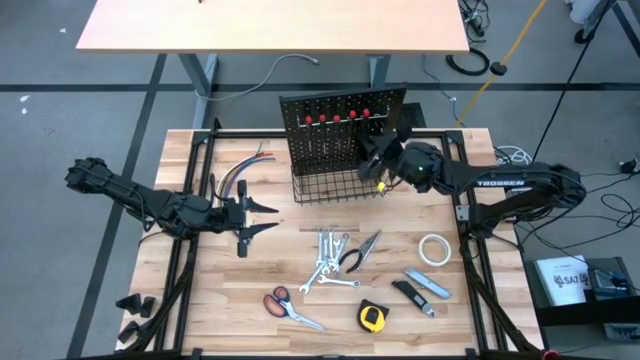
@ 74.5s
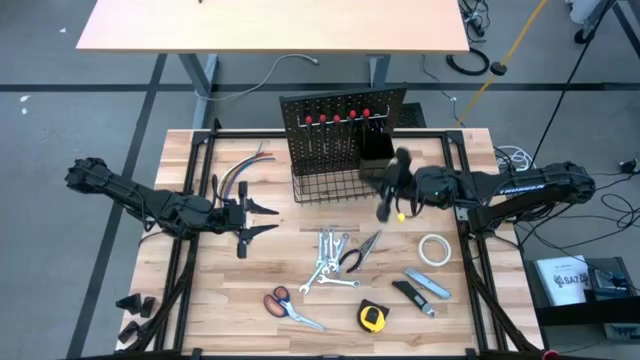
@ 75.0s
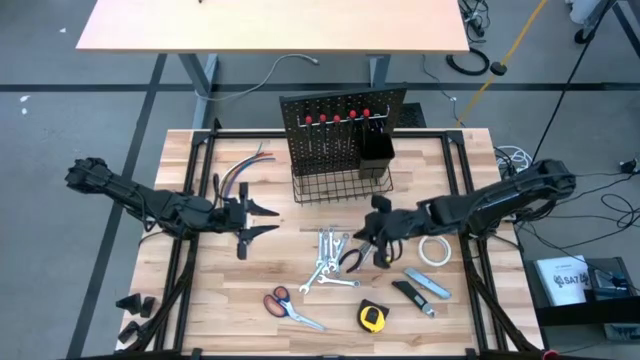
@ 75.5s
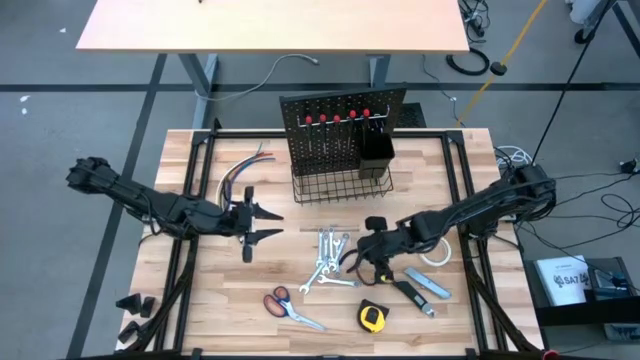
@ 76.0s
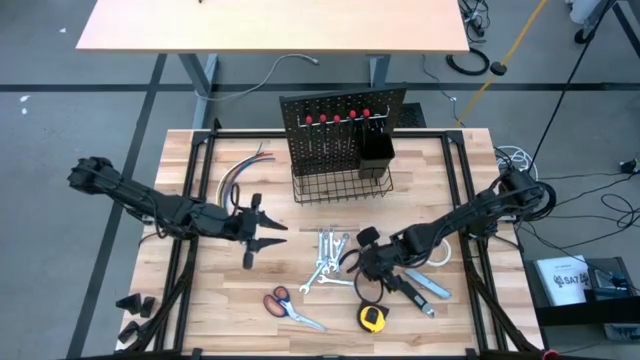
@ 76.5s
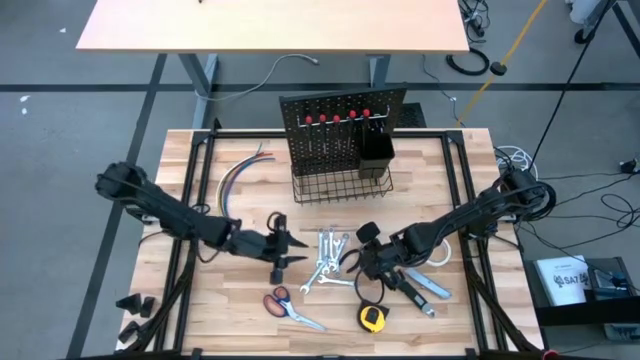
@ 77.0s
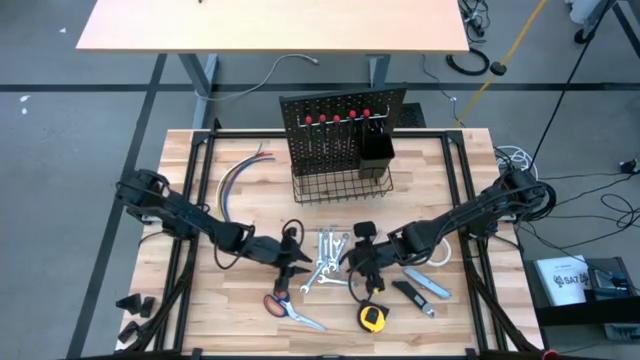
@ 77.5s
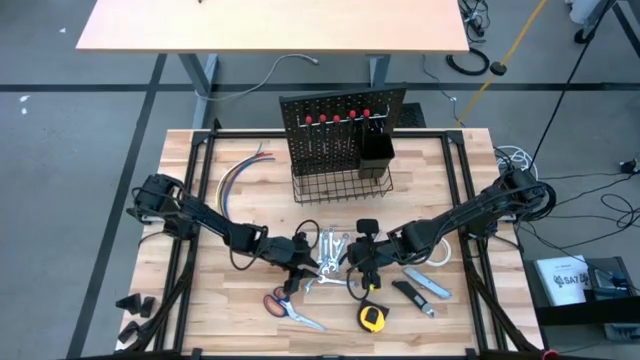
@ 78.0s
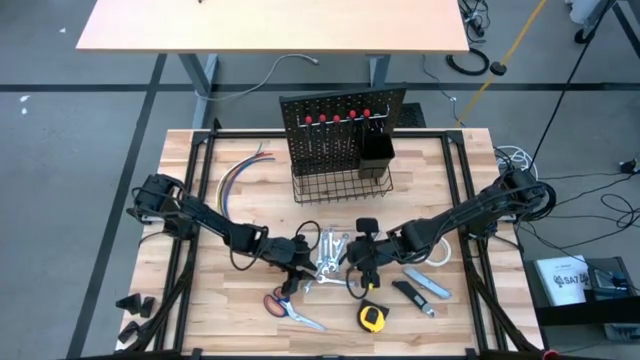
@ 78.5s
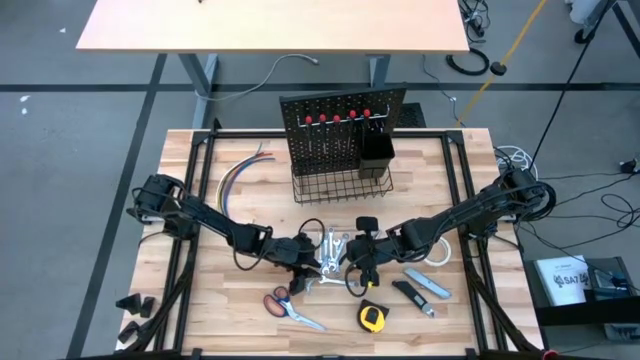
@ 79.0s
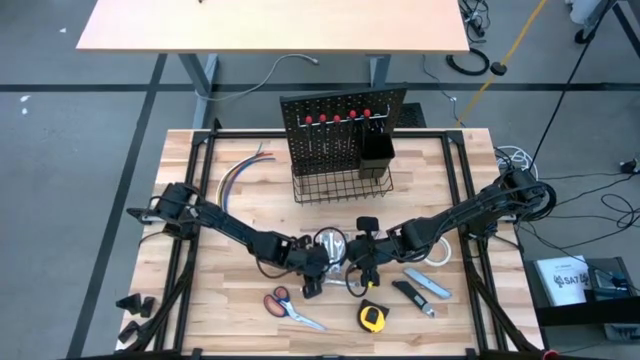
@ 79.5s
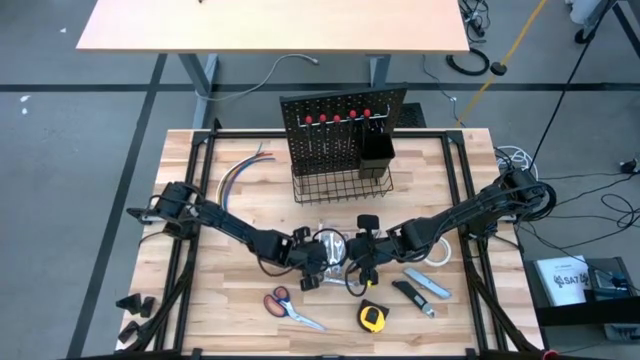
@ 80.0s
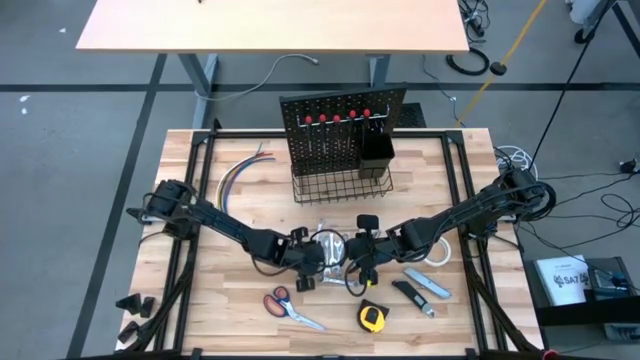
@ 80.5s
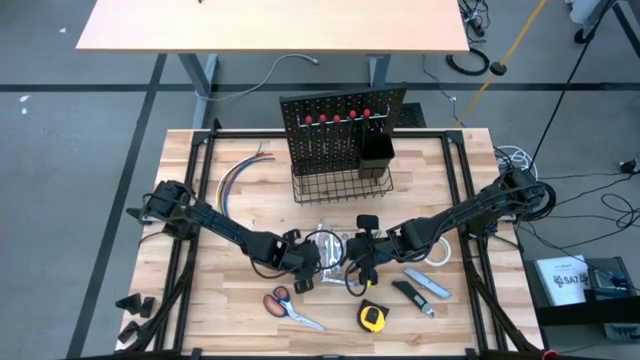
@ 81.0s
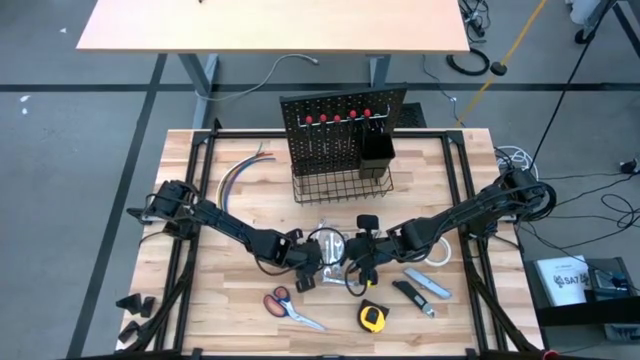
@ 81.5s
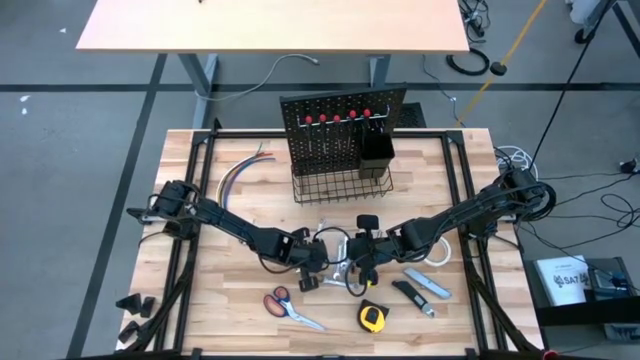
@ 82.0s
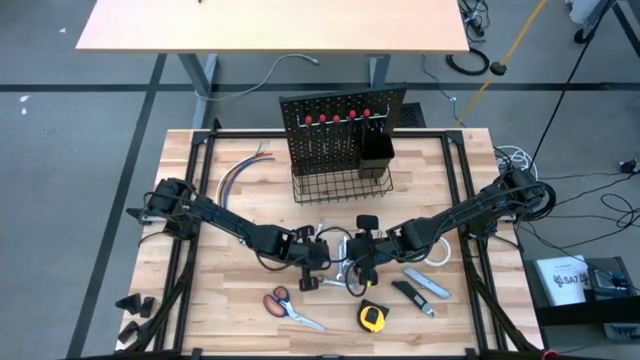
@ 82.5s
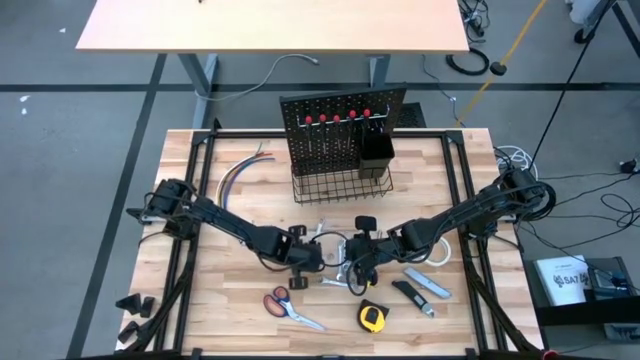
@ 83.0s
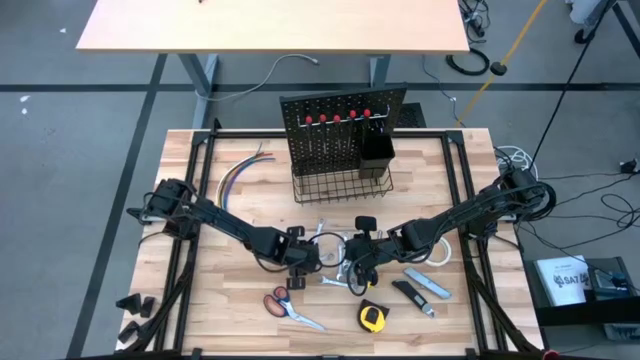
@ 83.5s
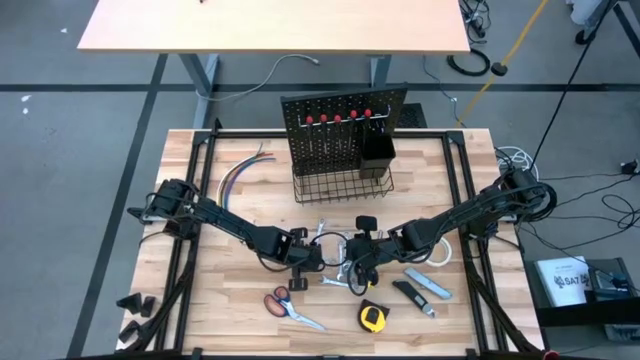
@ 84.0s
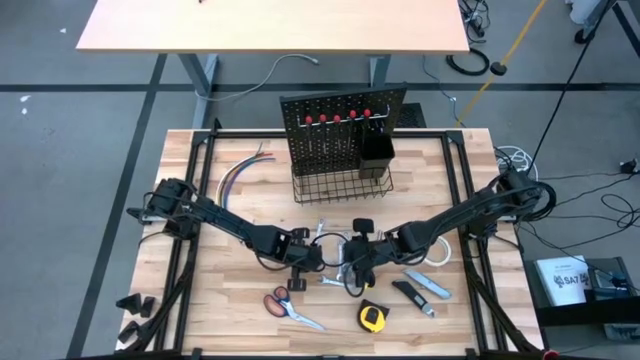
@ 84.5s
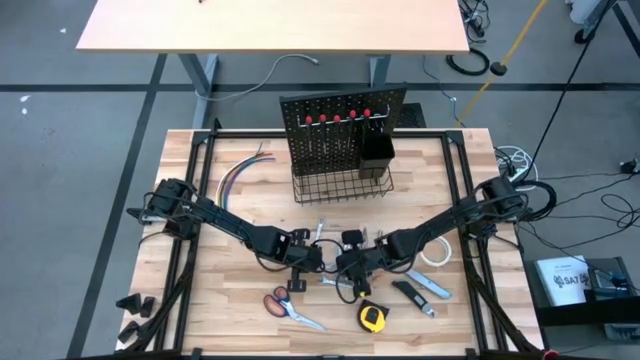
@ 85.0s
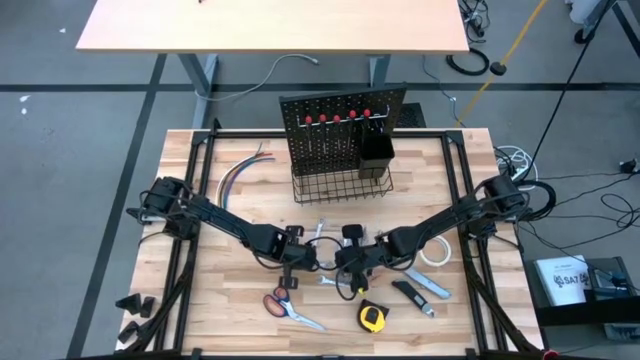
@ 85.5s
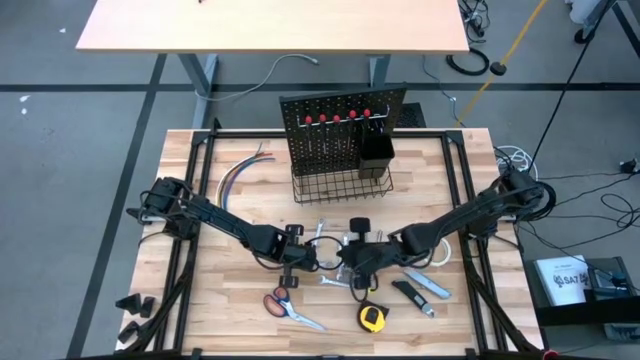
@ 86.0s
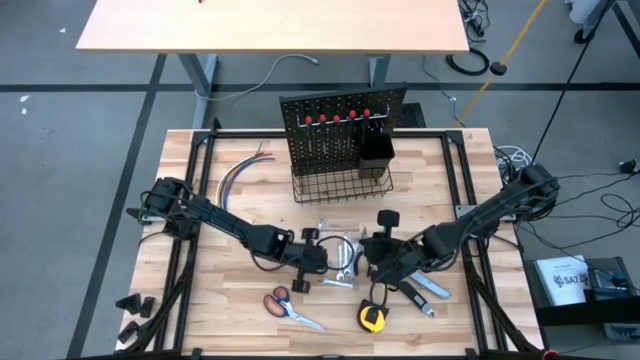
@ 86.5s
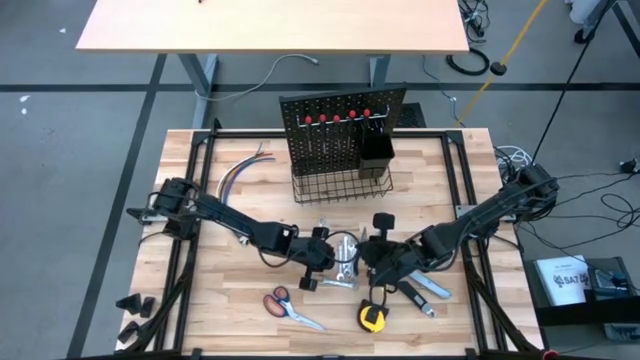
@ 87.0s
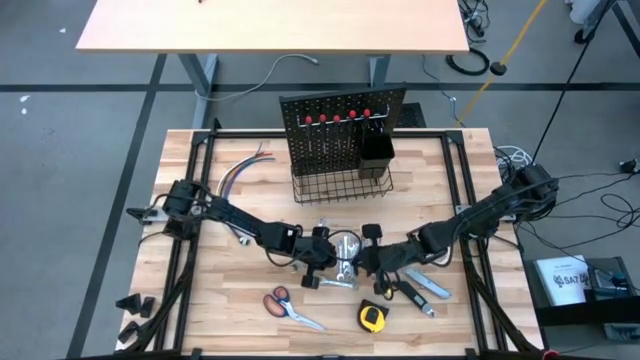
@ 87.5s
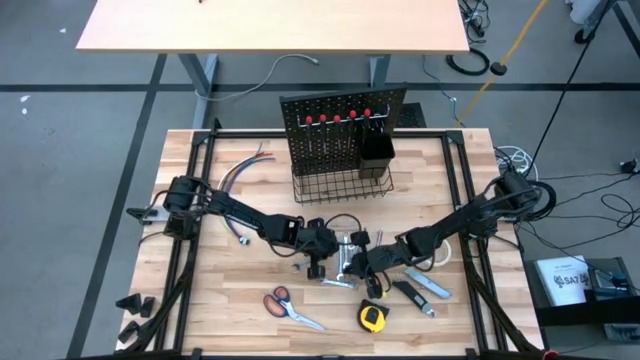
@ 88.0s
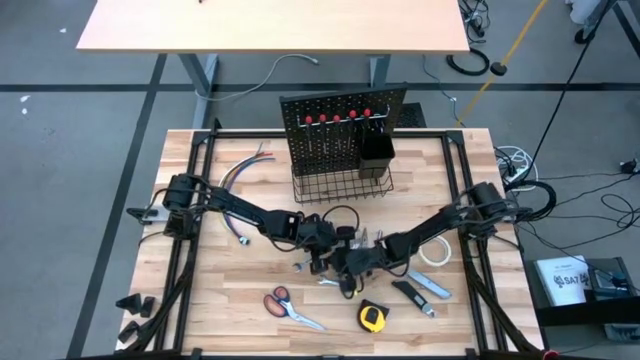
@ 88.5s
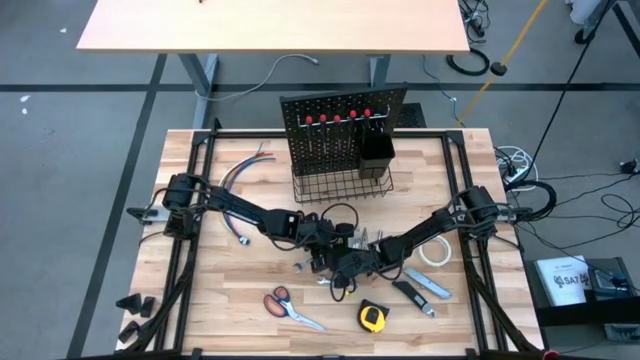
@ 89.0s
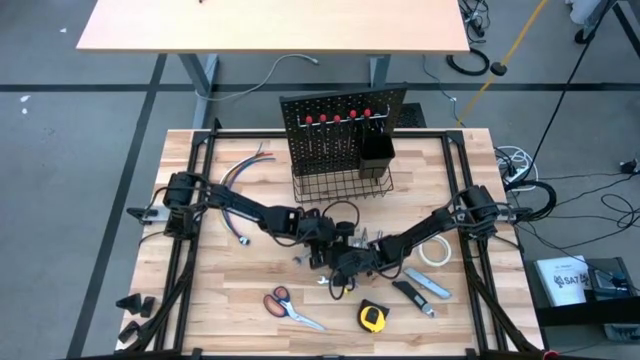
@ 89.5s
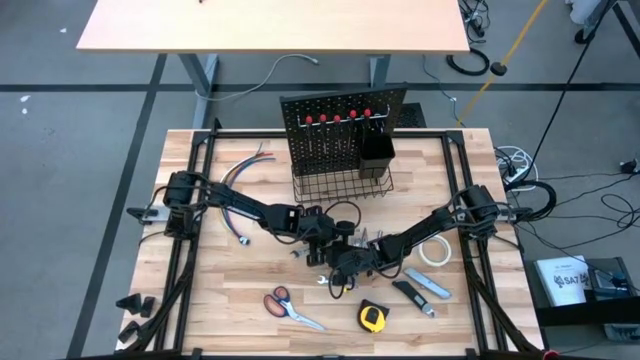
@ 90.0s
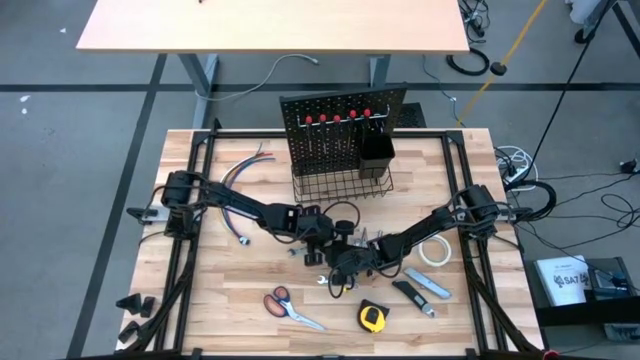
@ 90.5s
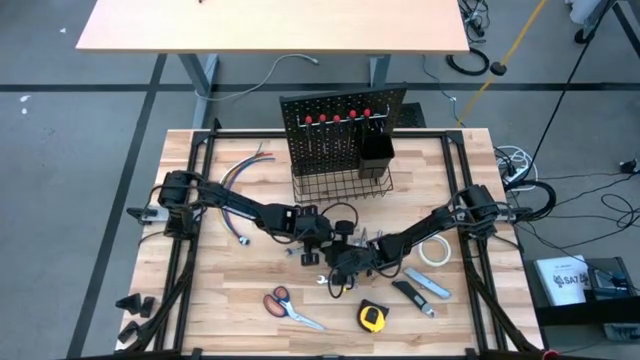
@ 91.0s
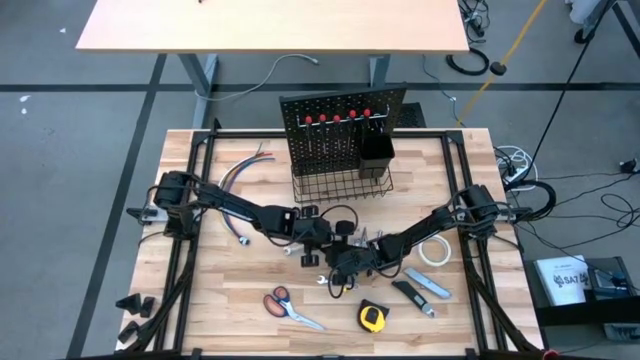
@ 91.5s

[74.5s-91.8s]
Task: Hang tools onto peg board
Put the wrench into the black bin on the pegboard

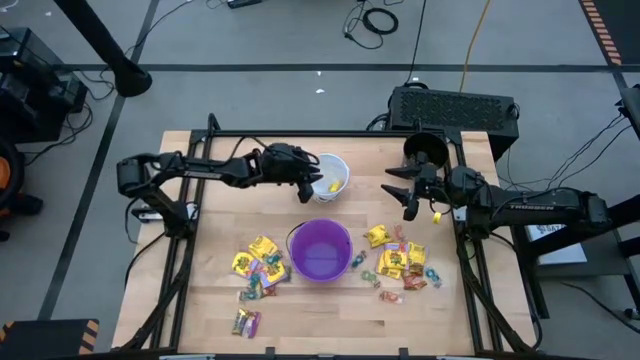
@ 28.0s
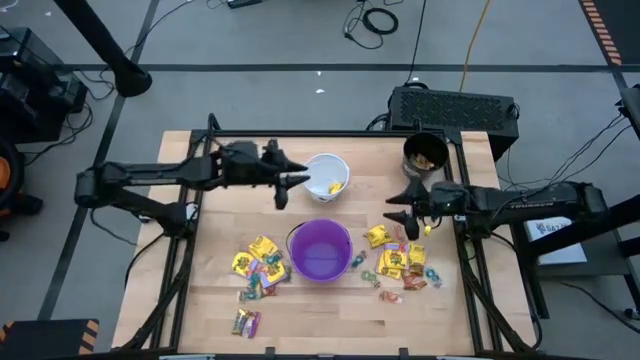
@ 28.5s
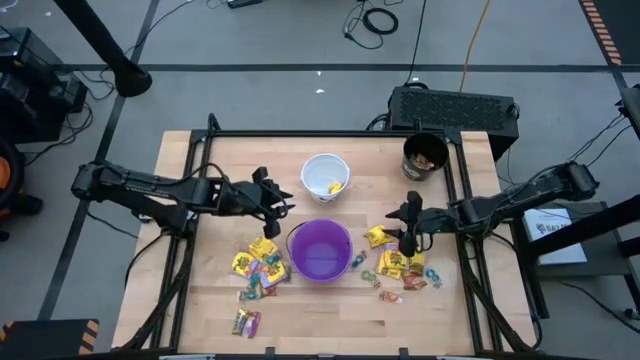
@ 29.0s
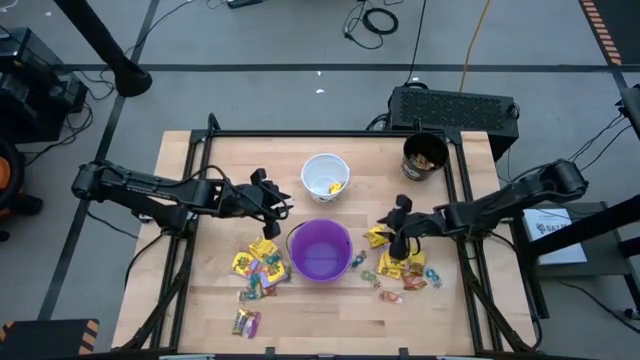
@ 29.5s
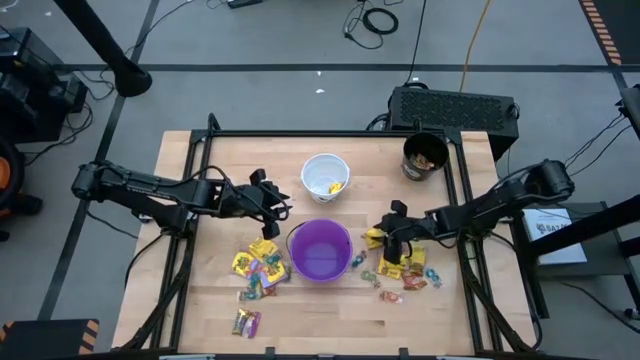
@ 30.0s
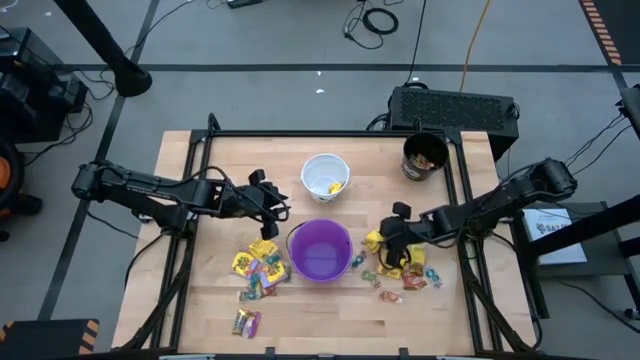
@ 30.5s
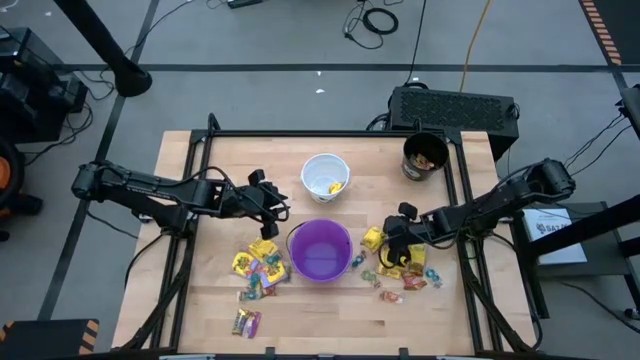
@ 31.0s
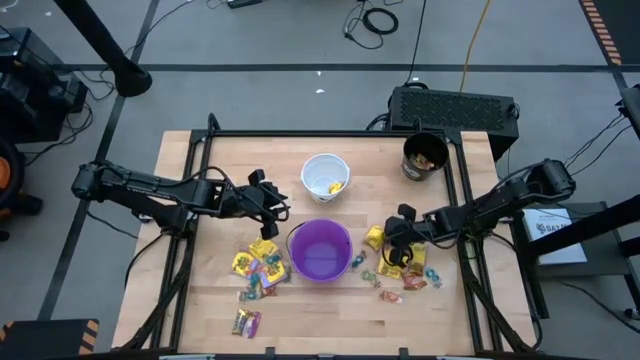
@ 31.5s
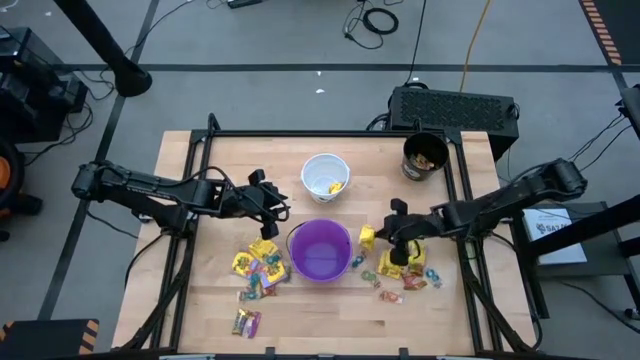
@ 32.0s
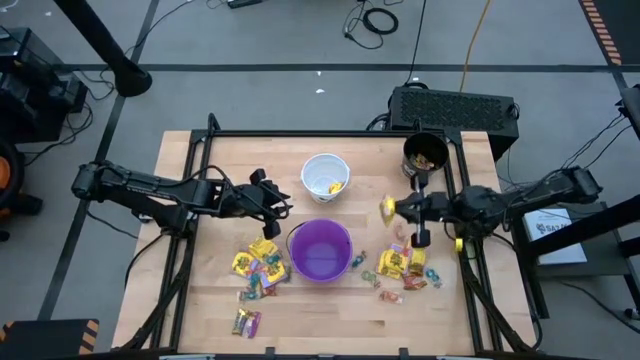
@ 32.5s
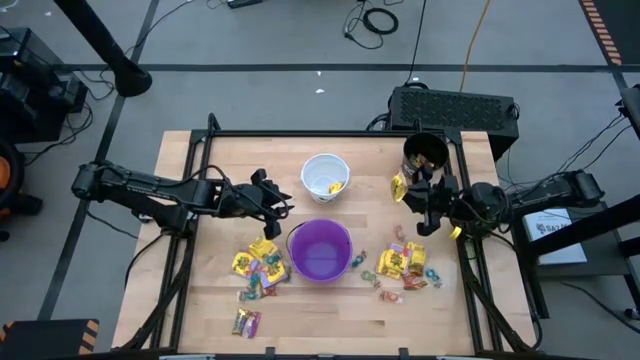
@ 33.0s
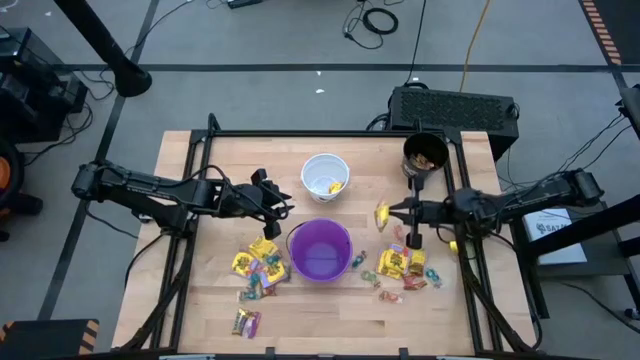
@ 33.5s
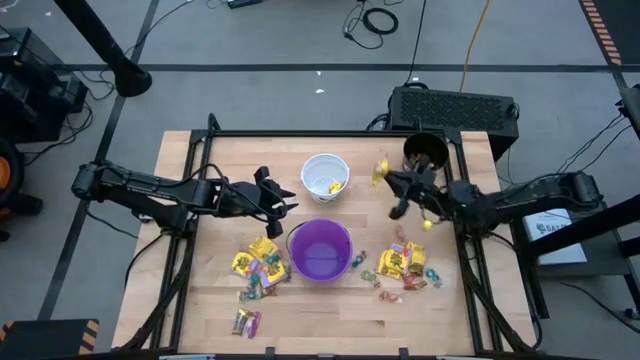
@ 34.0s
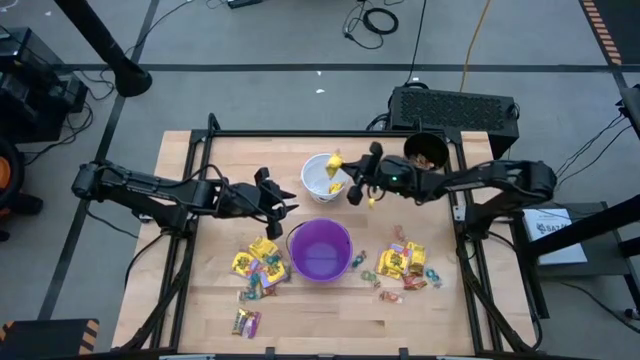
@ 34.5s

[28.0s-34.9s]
Task: Sort candy by brand, put in halloween buckets
Put the yellow candy into the white bucket
